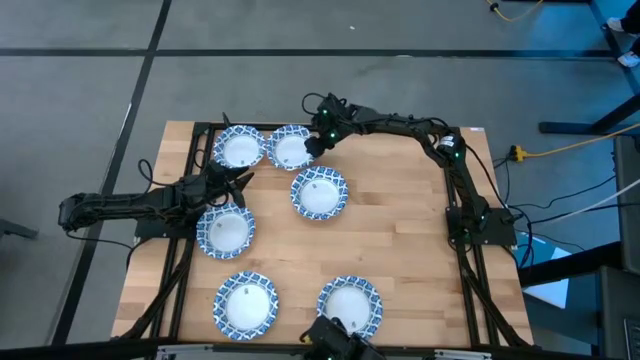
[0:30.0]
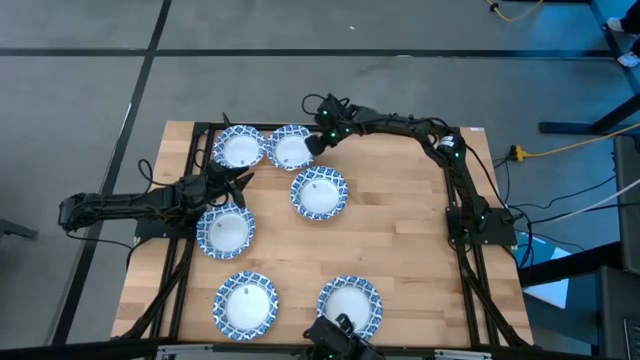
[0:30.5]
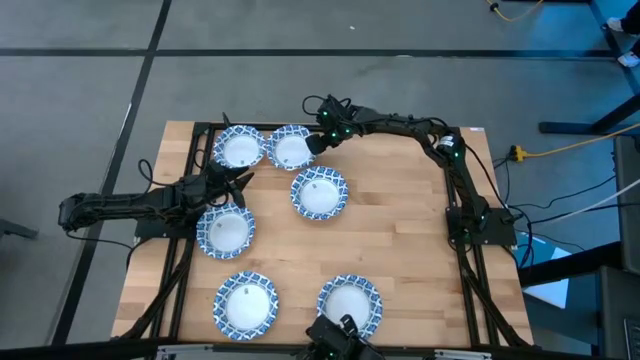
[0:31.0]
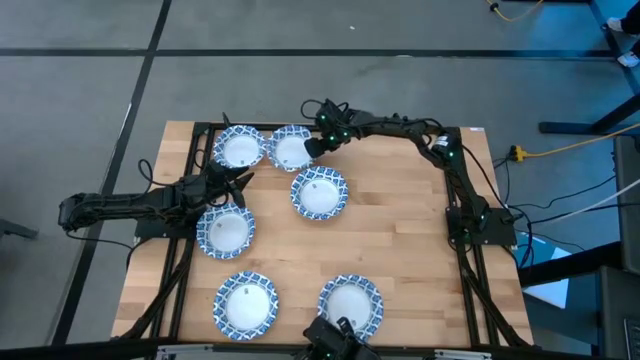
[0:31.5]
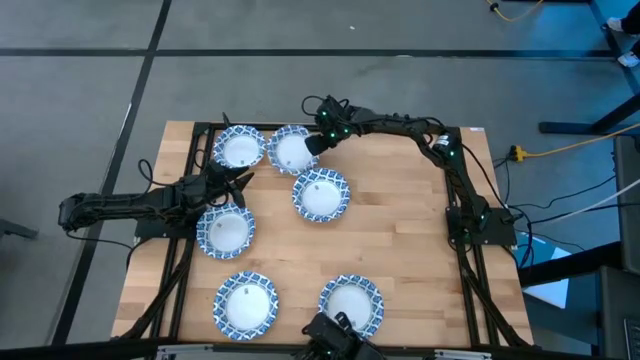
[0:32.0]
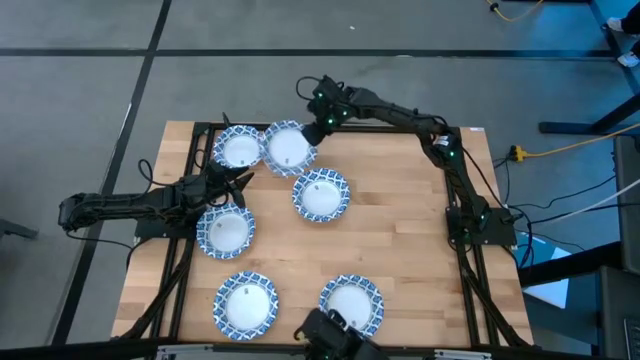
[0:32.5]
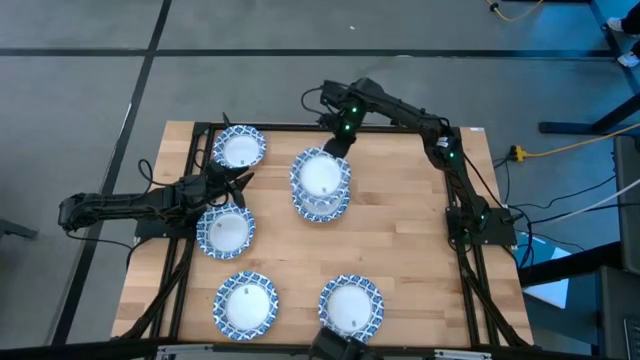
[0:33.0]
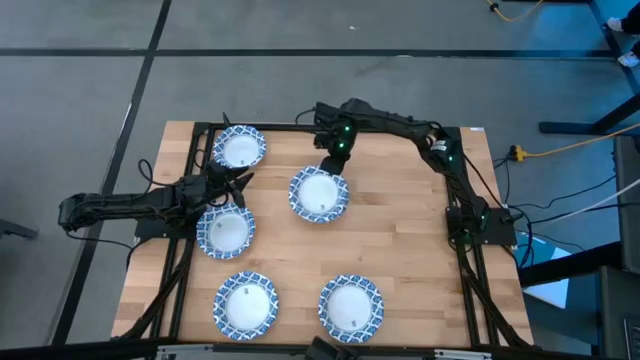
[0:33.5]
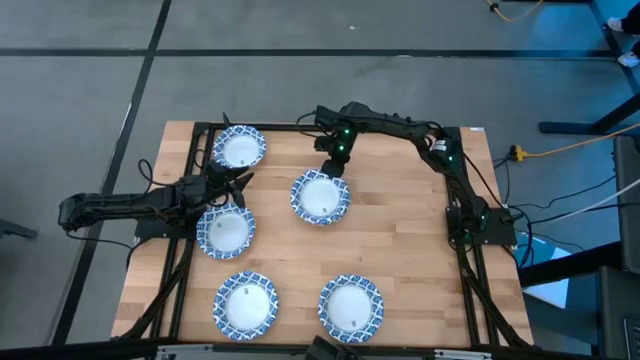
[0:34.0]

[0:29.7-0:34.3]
Task: Nest bowls inside each other
Stack the white bowl on top of the white bowl

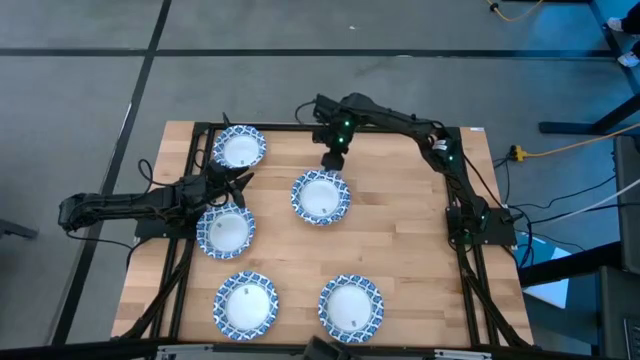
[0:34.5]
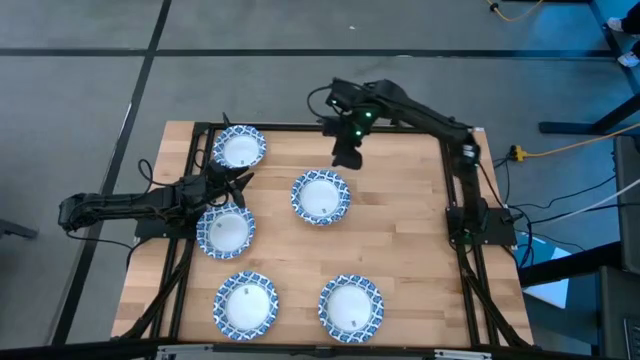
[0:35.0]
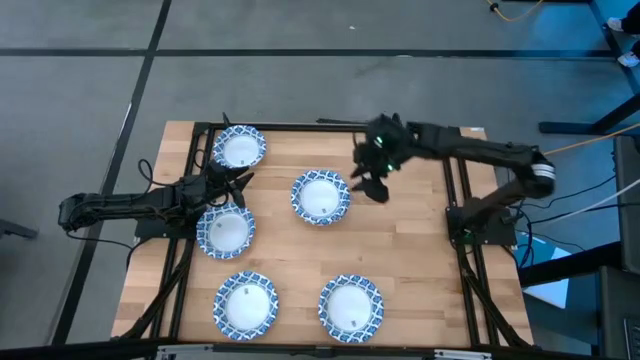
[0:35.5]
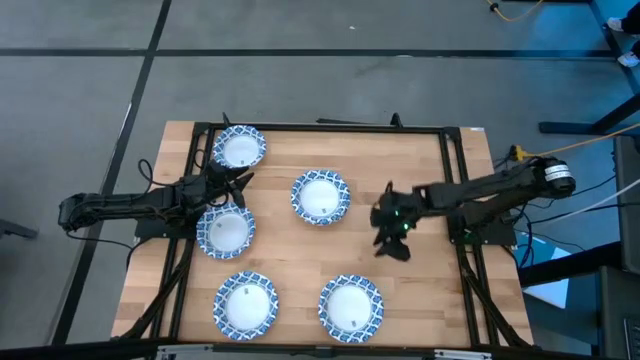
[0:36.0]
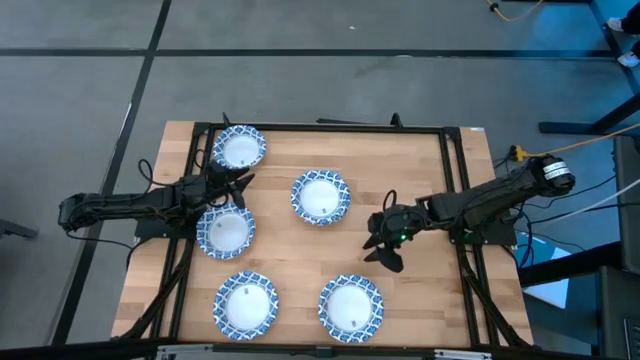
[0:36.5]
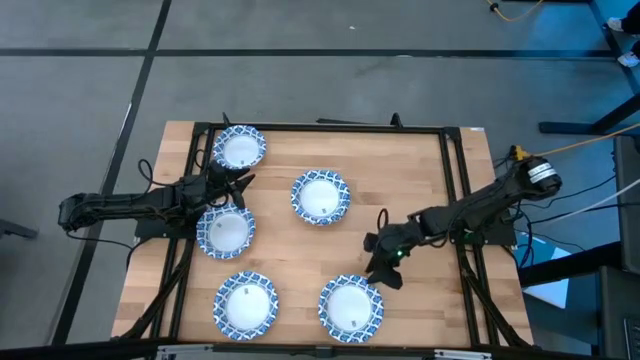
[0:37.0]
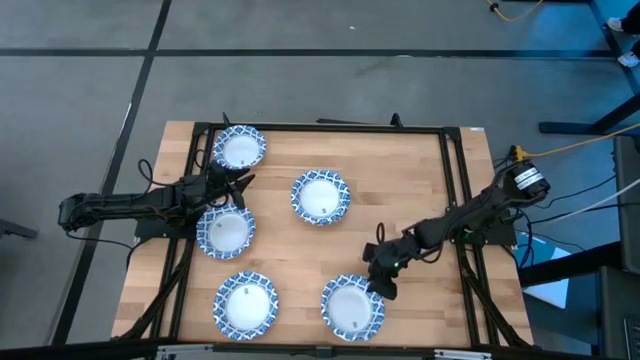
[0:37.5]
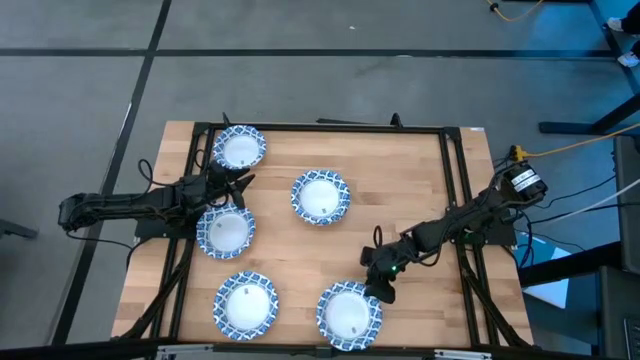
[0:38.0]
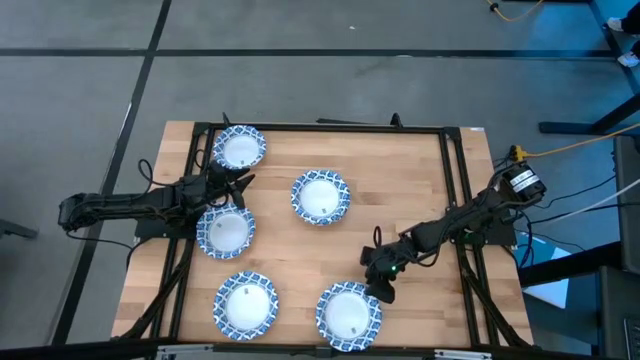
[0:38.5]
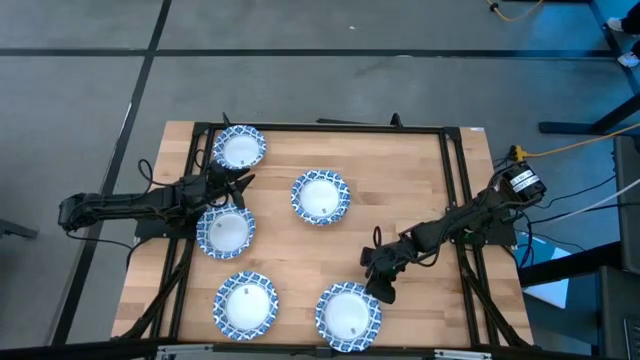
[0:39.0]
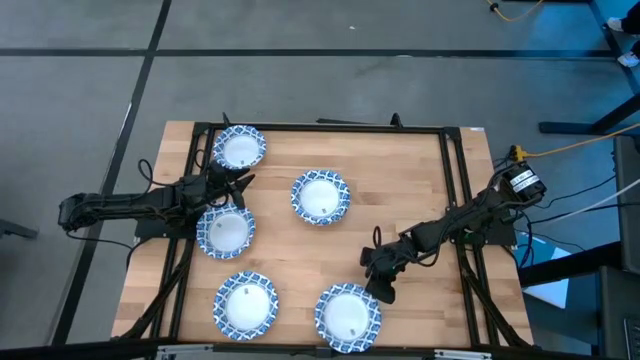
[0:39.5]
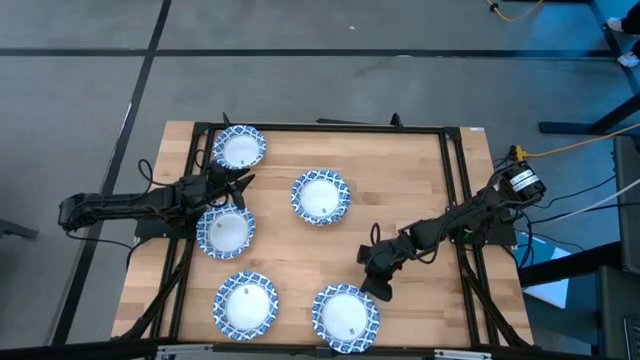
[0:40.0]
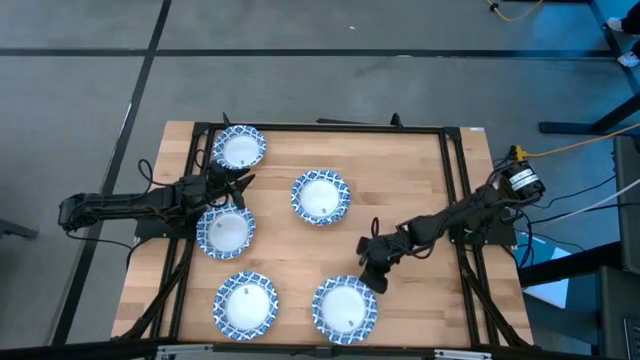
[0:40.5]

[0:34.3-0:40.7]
Stack the white bowl on top of the white bowl

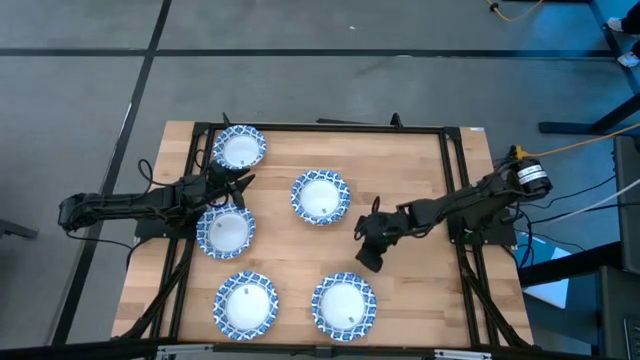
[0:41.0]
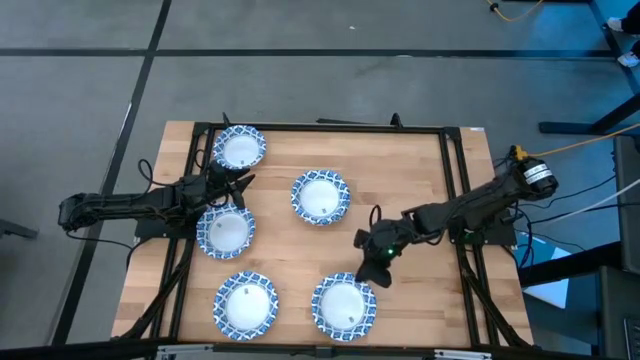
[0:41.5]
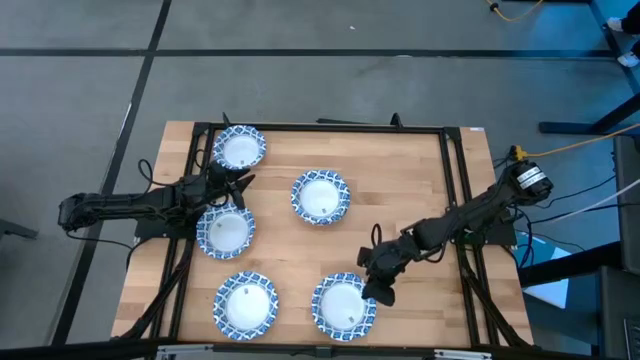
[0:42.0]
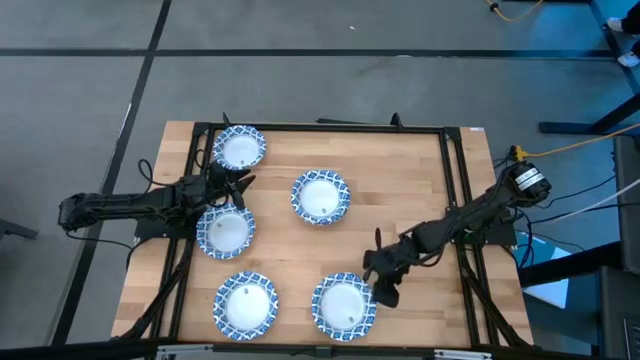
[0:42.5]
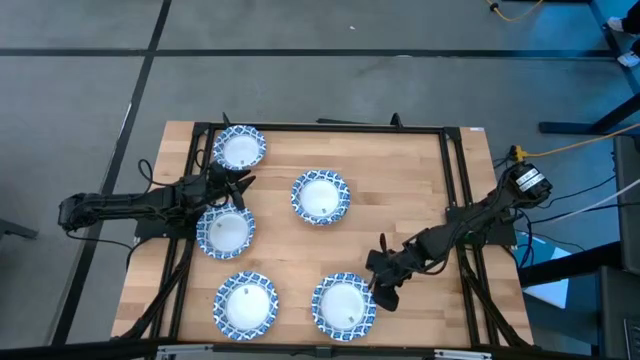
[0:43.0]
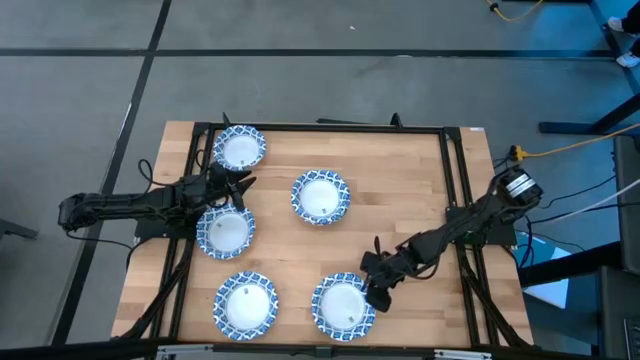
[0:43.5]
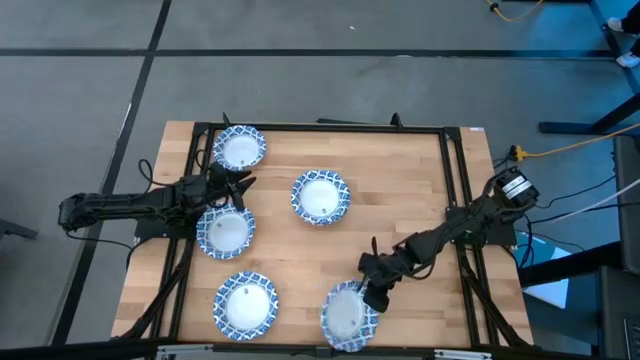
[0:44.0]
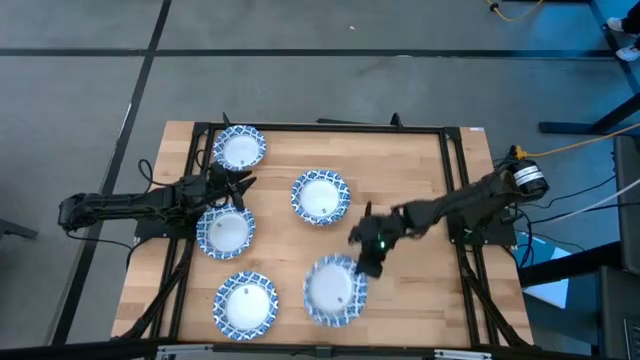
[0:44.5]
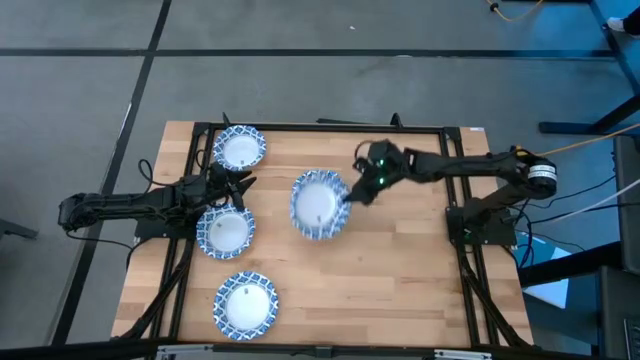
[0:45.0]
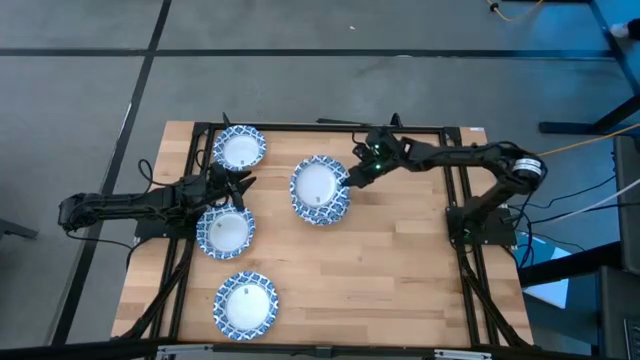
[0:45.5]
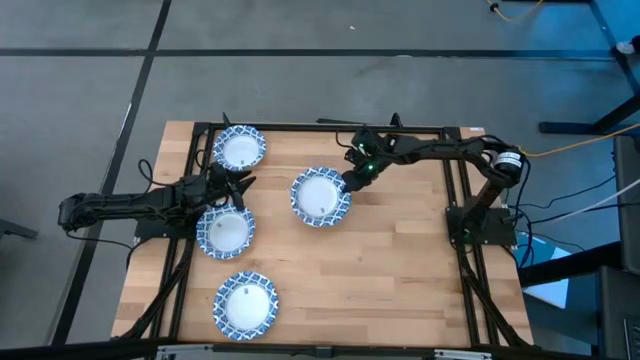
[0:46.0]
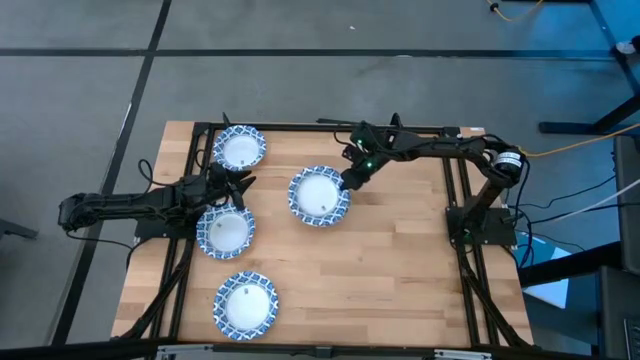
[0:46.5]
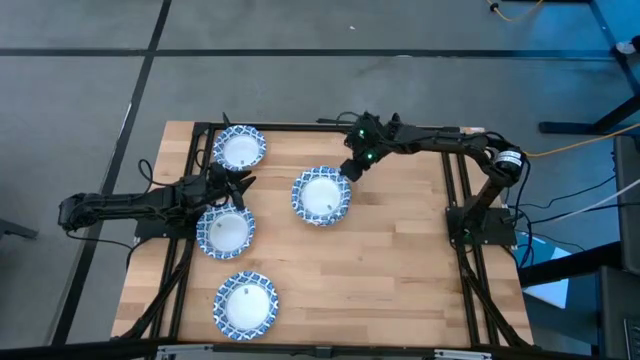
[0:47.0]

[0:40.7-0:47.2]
Stack the white bowl on top of the white bowl

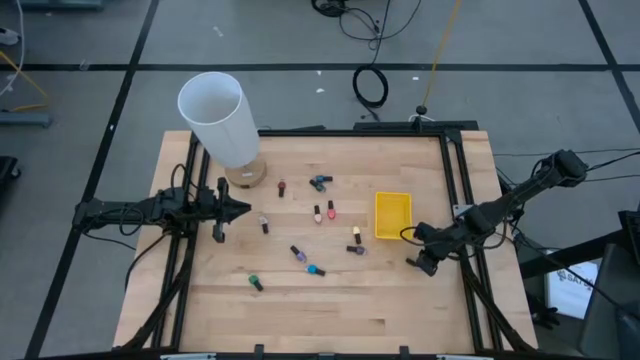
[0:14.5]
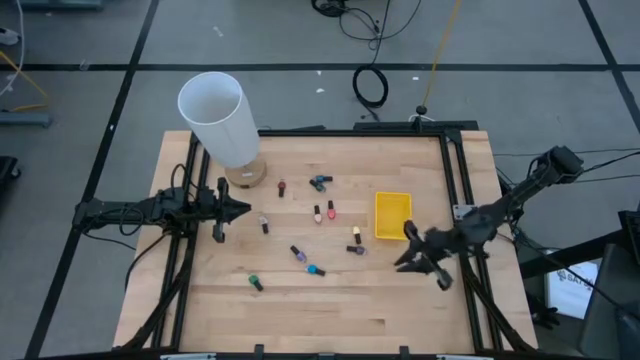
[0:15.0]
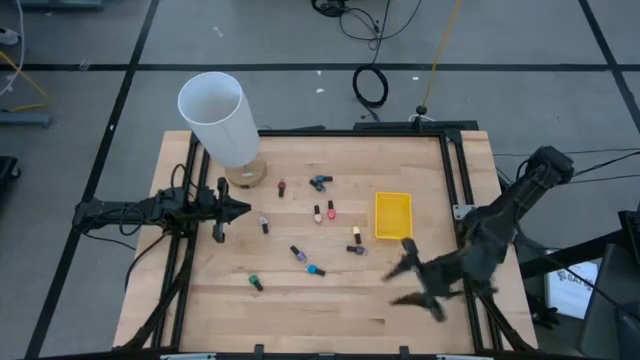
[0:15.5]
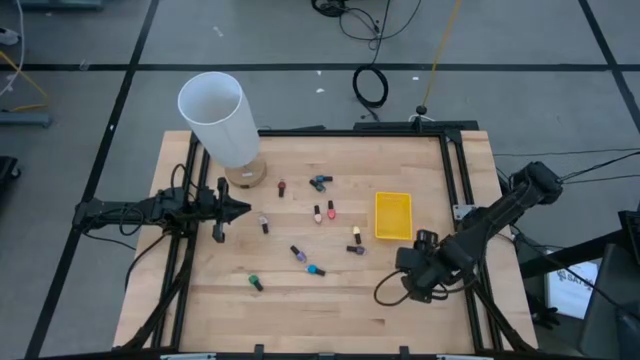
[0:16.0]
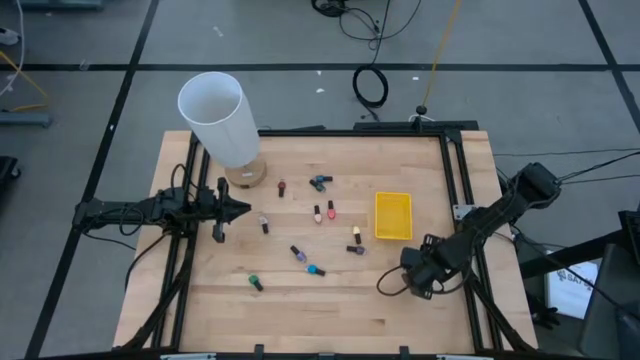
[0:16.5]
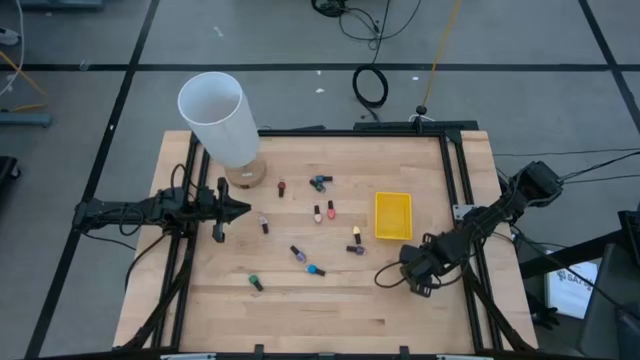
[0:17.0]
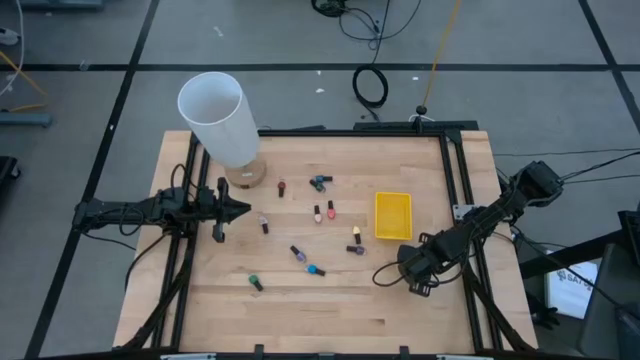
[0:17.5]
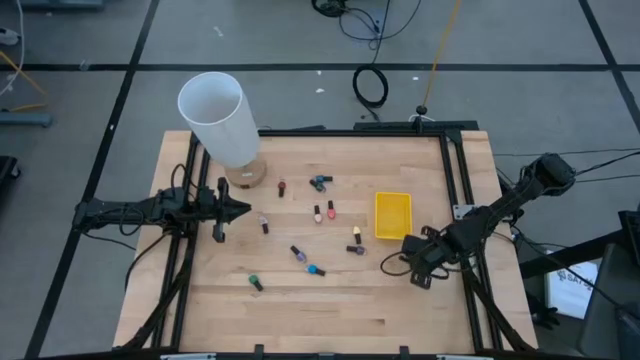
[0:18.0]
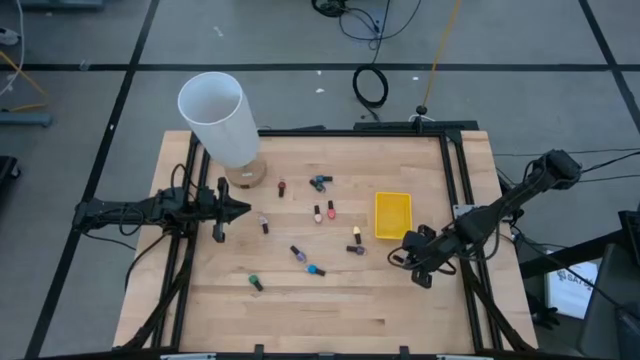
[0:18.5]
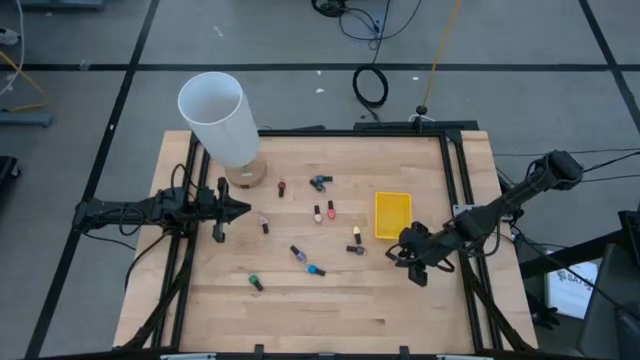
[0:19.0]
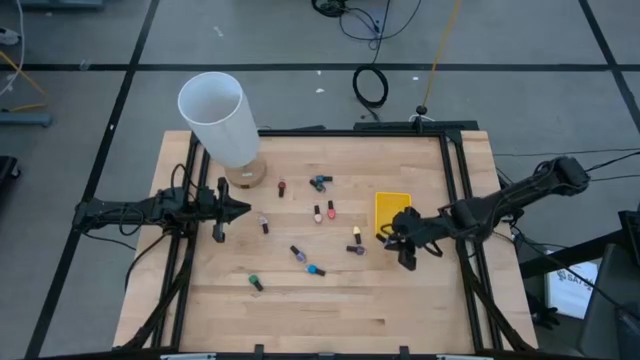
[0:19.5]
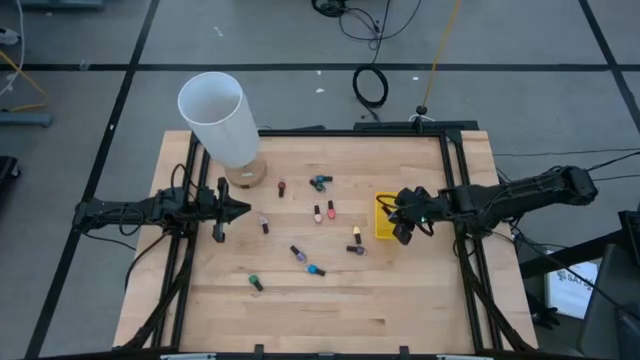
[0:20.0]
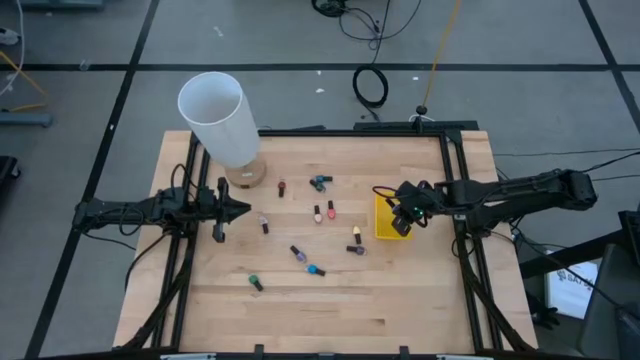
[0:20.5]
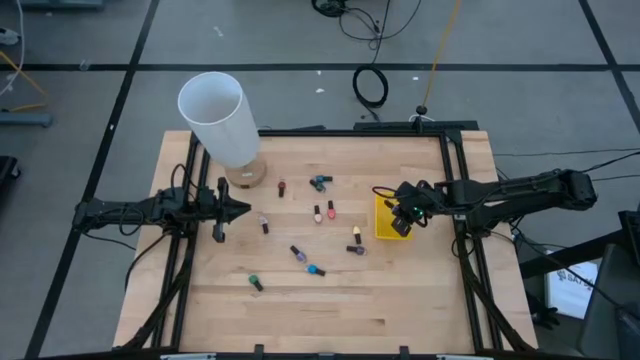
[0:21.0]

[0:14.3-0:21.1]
Task: Pick & Place Nail Polish
Put the light blue nail polish into the yellow bin
